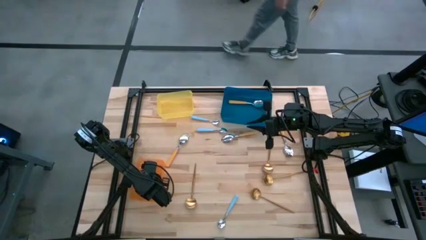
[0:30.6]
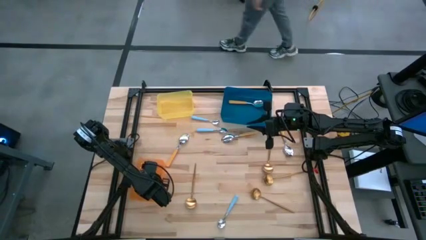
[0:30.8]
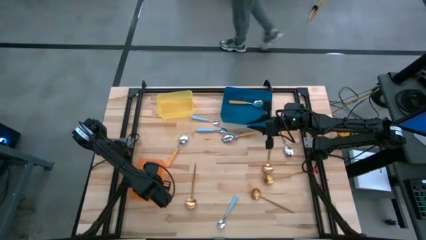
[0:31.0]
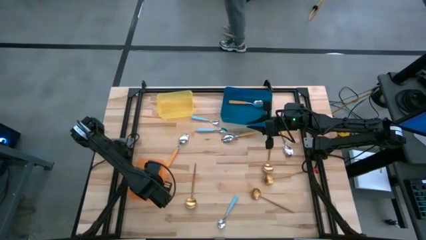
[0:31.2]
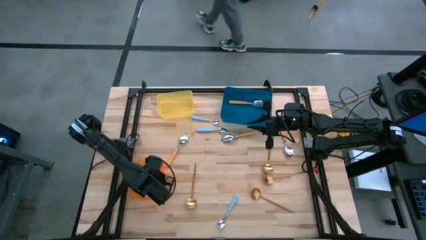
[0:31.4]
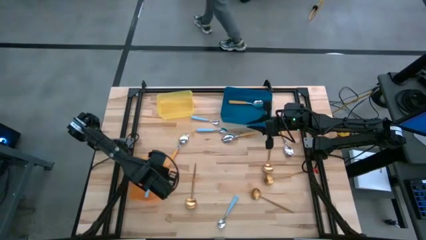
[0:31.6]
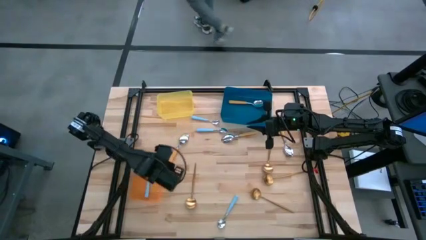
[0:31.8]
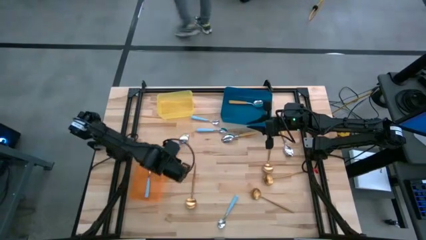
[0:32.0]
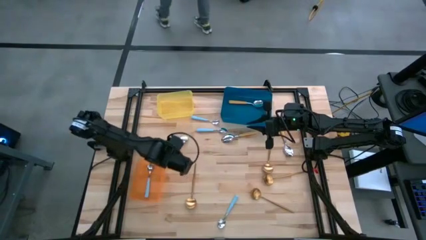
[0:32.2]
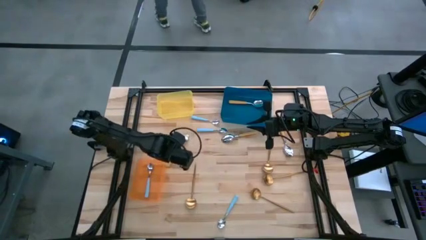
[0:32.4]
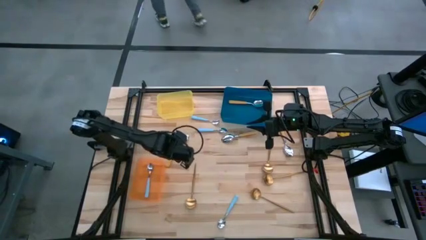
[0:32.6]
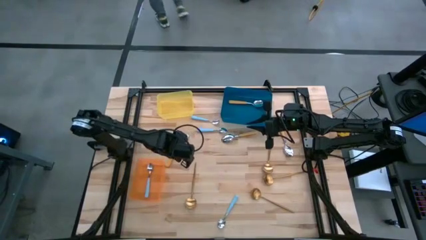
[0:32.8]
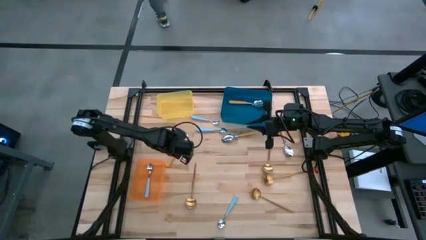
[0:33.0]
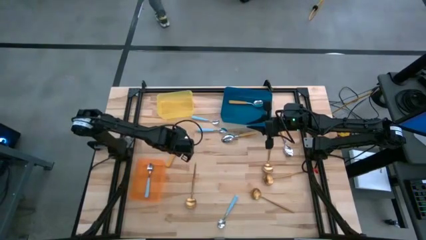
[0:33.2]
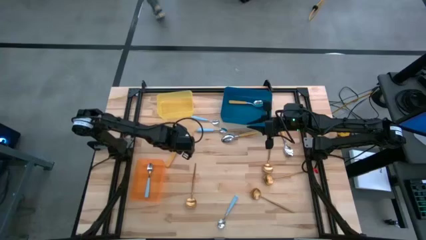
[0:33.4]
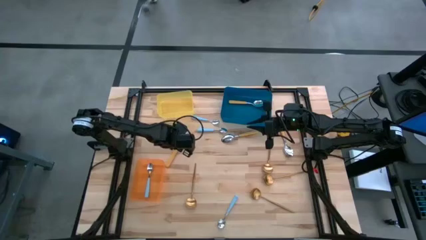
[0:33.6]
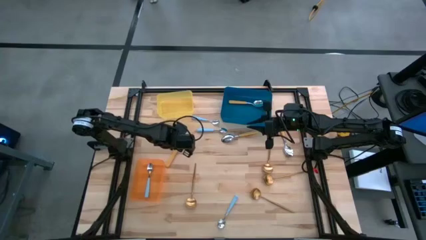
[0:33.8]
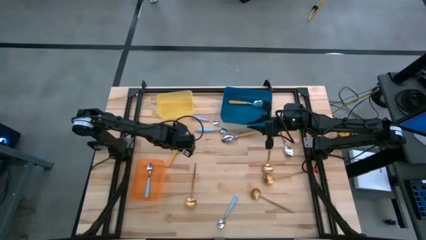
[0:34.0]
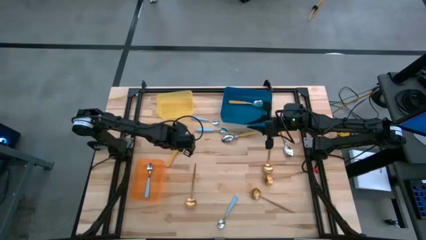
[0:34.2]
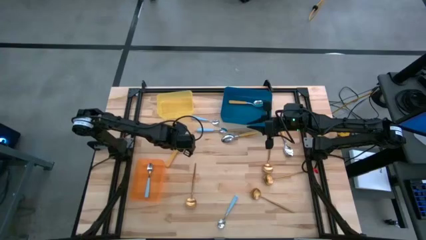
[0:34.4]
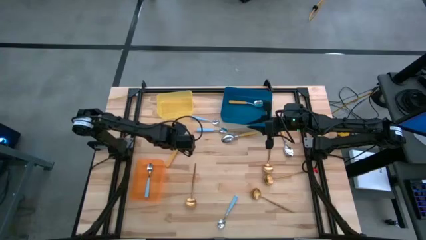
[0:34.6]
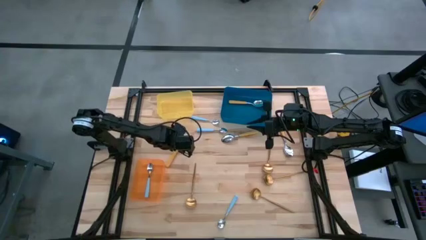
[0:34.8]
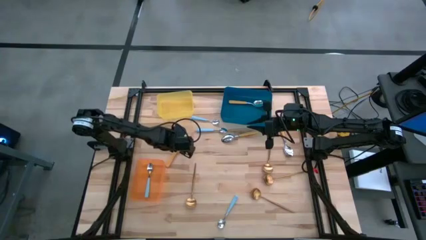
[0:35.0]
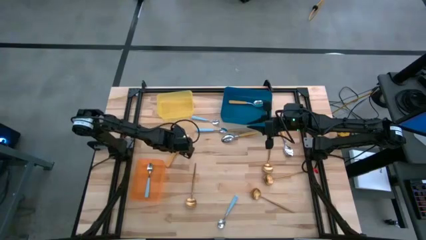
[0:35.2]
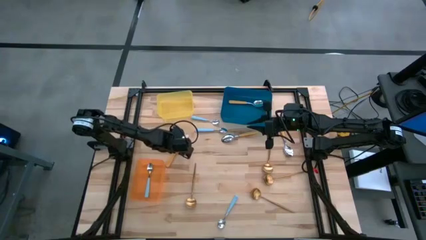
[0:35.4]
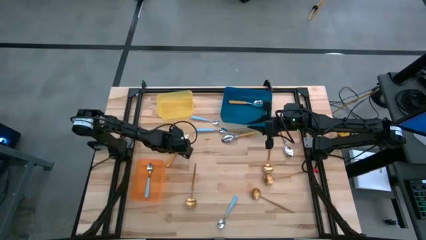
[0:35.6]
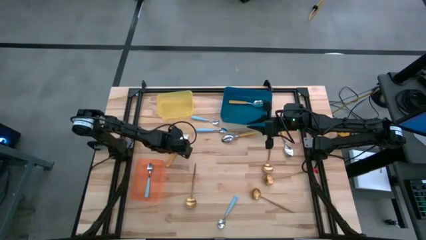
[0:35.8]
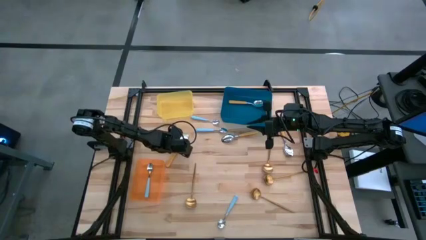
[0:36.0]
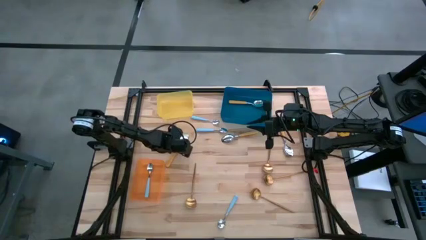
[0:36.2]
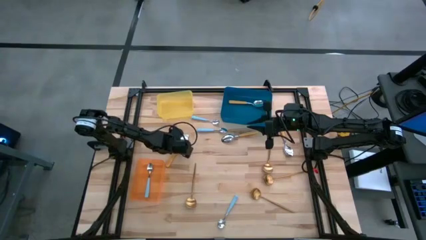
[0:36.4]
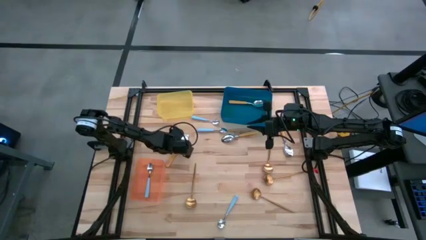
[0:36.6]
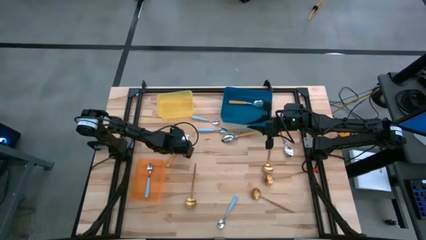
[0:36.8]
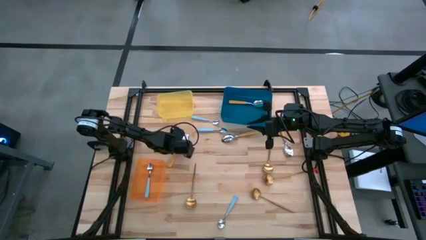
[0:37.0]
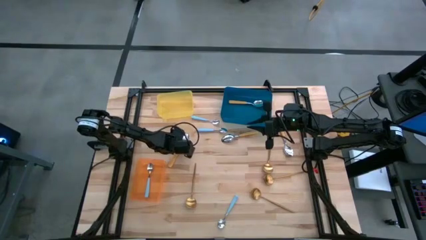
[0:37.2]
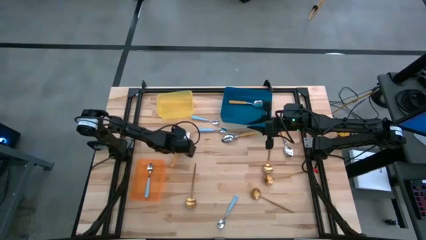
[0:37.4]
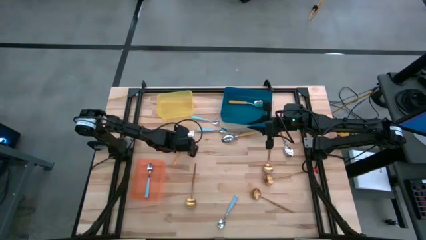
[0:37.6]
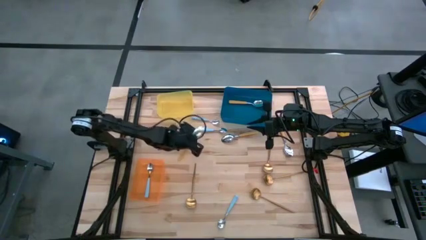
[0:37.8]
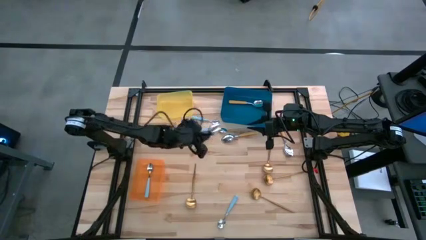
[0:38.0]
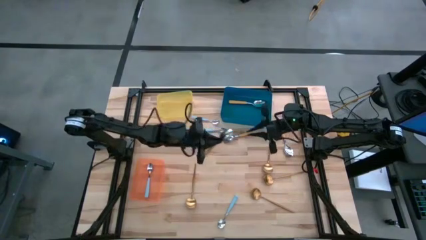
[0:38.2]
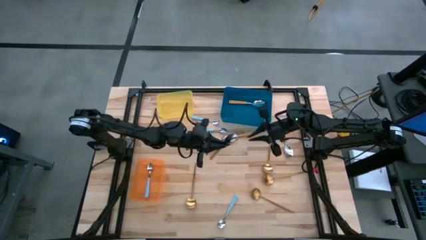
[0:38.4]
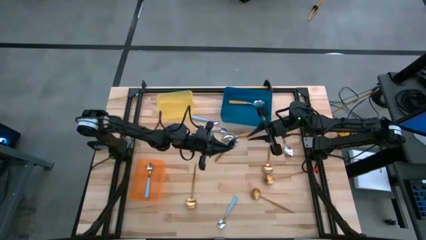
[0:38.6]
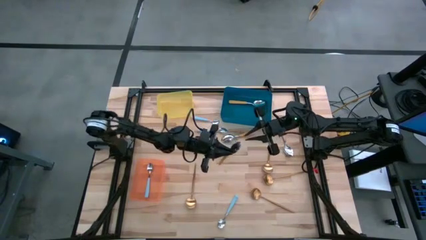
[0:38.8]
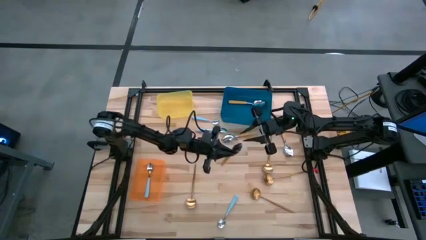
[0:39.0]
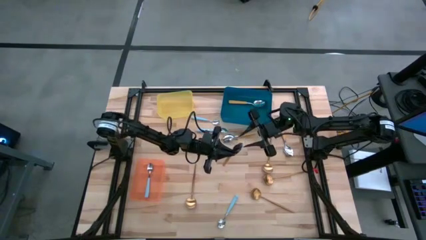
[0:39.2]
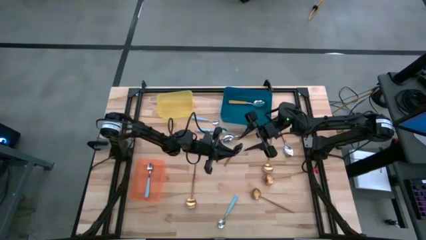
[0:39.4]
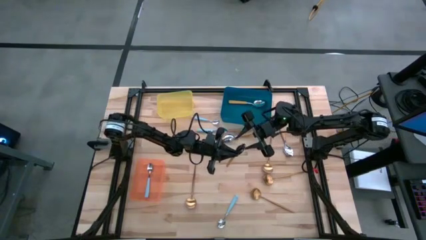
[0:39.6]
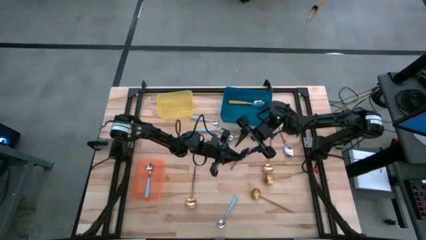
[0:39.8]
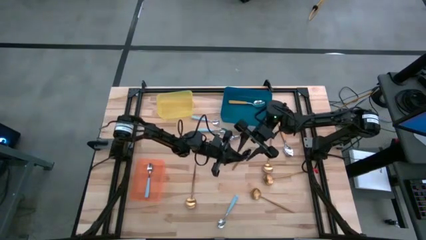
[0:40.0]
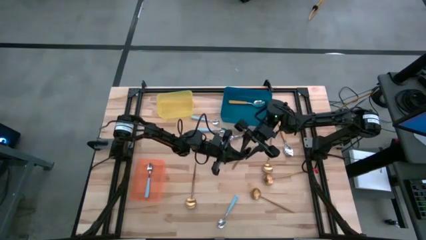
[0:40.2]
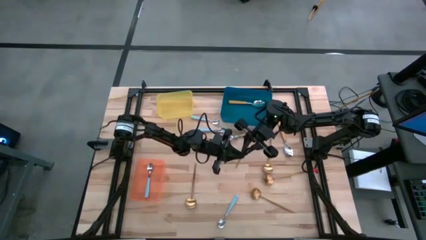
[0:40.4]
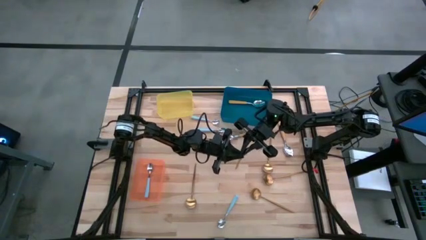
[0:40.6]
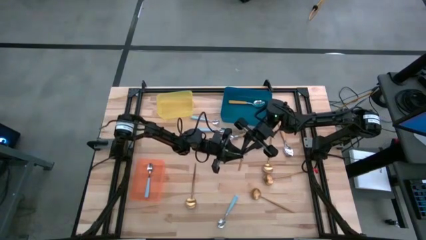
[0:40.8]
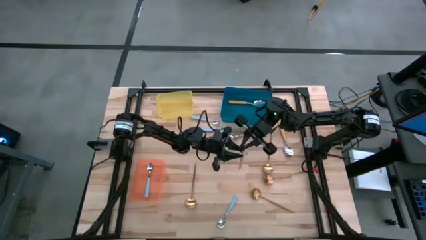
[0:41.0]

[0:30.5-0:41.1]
Task: Sort silverware by color (type)
Put the orange spoon into the blue bin

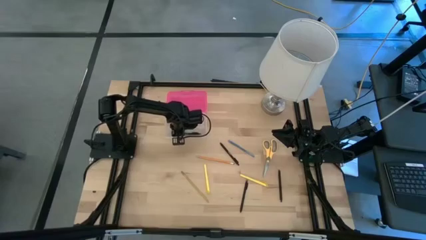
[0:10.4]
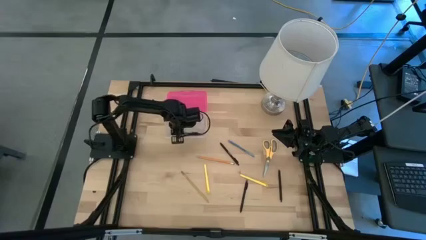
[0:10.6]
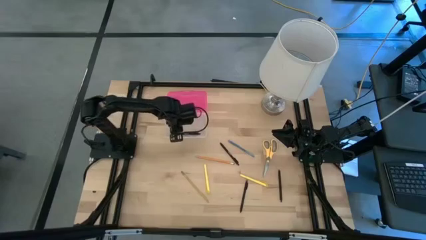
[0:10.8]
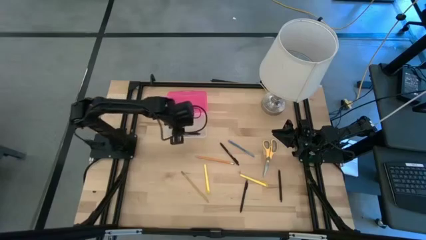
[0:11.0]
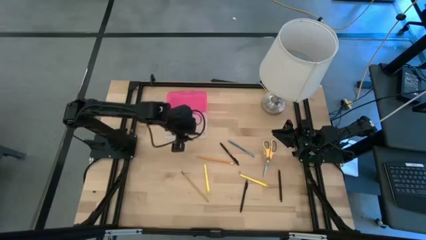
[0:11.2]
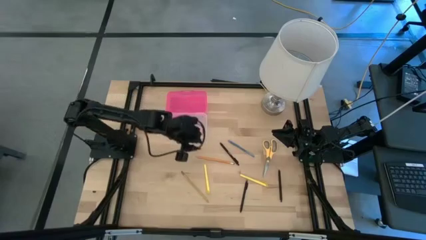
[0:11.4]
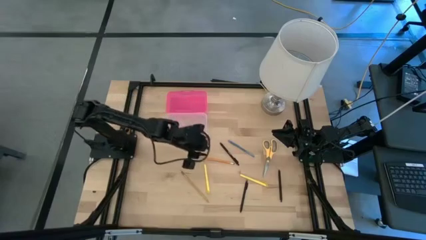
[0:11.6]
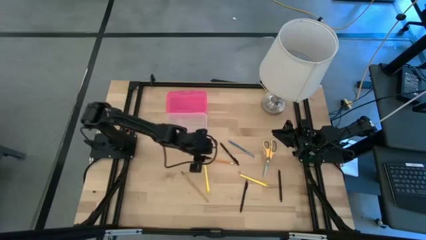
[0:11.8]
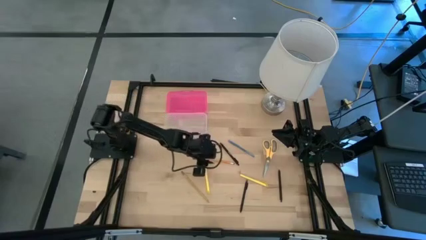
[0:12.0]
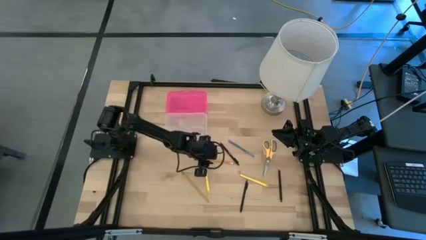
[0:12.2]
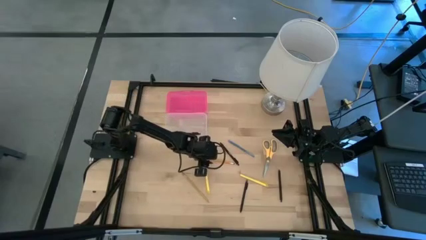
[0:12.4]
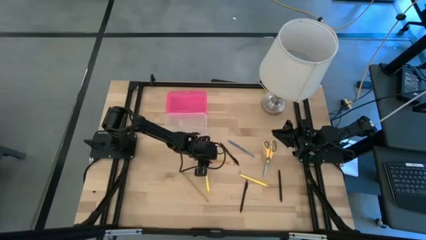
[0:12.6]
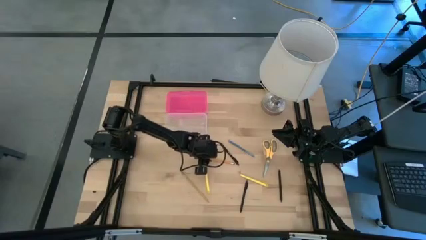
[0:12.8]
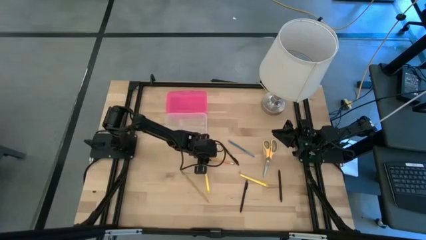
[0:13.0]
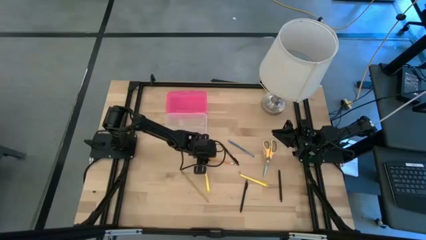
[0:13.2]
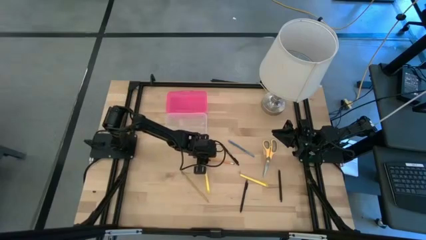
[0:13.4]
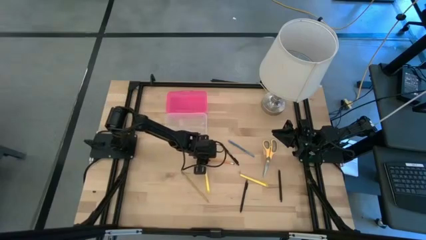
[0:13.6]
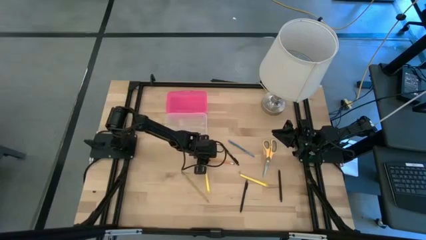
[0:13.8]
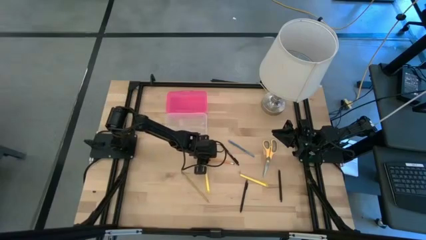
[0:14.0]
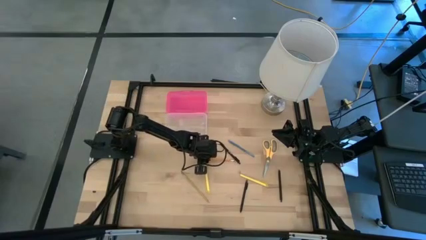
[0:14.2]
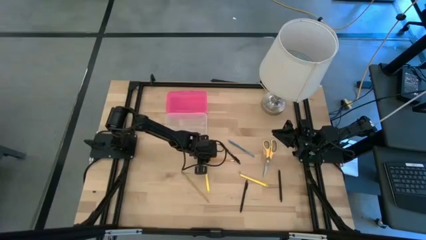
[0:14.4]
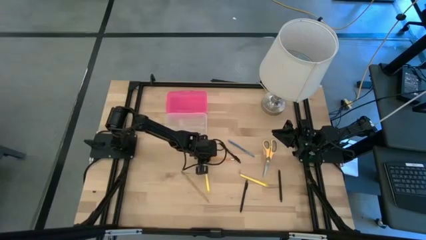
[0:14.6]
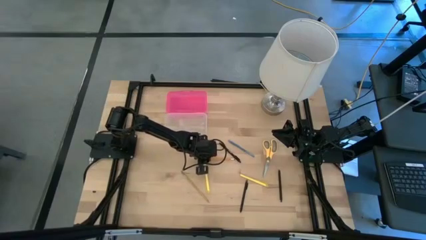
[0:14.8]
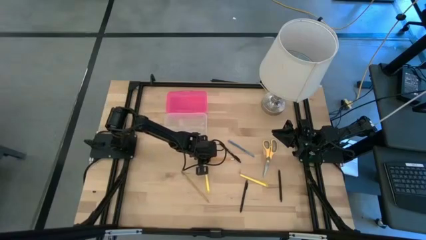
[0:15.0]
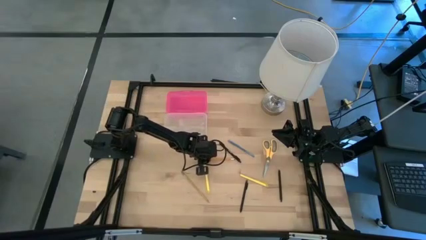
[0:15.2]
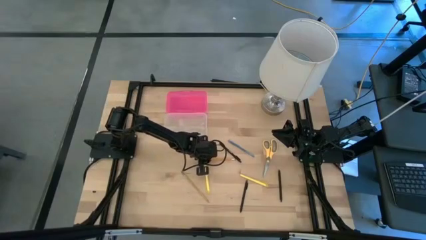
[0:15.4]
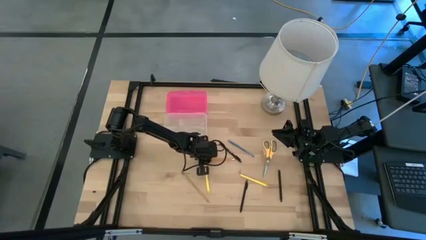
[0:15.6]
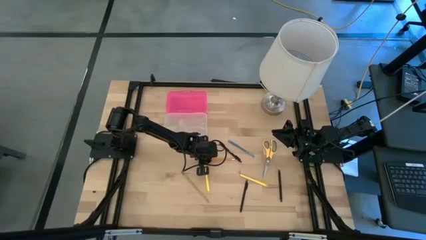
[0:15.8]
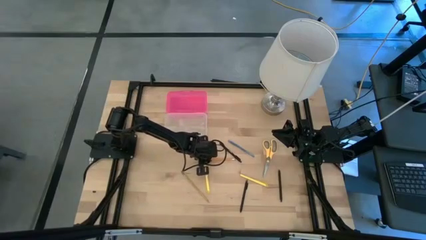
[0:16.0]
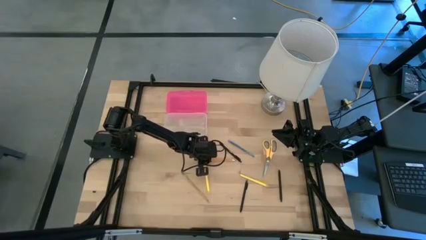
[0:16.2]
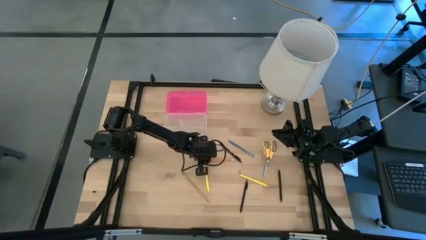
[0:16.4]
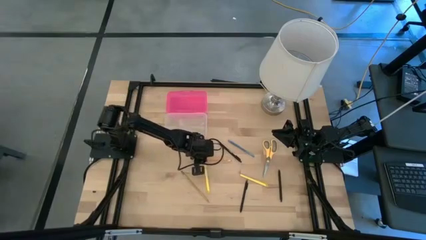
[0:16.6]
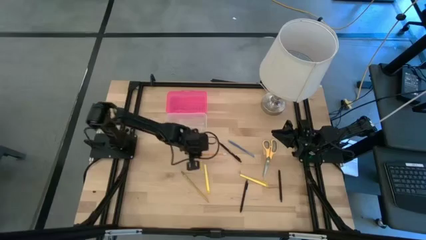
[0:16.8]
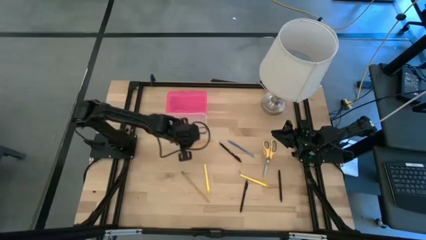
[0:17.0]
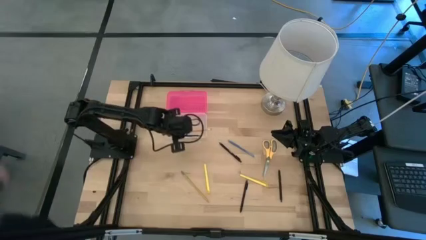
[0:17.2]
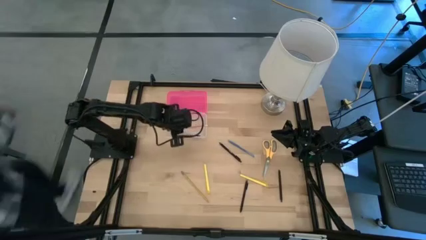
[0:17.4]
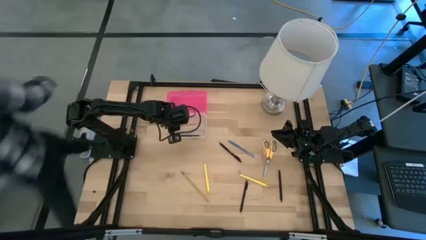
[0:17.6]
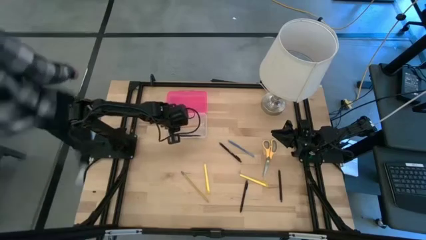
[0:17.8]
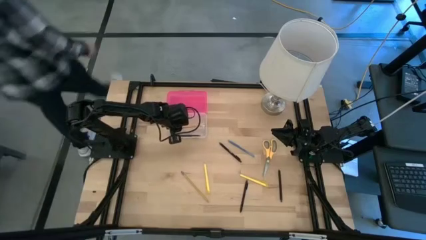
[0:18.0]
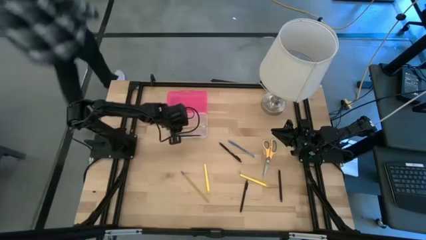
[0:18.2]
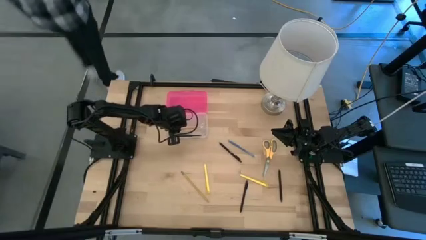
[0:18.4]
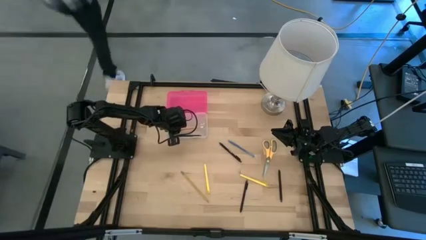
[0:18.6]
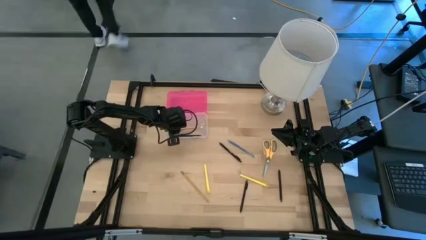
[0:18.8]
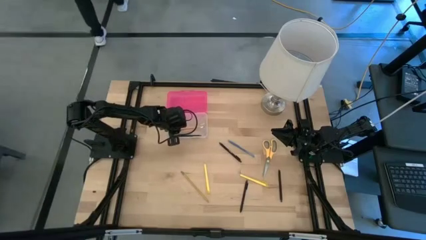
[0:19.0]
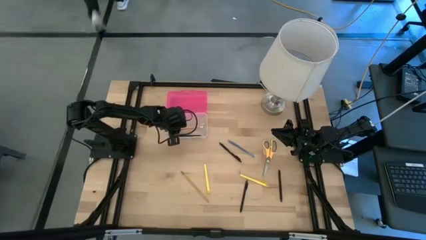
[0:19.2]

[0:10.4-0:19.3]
Task: Pick & place school supplies into a supply box
Put the orange pencil into the pink supply box
